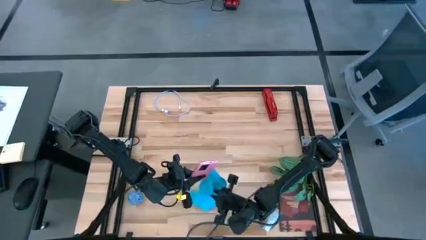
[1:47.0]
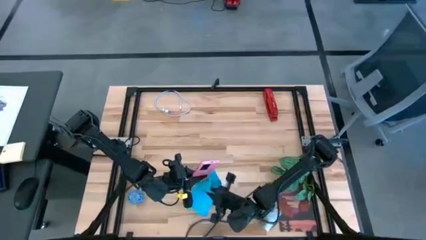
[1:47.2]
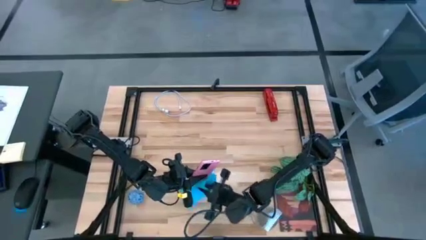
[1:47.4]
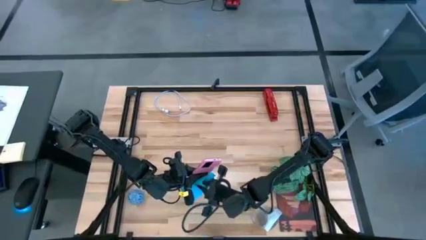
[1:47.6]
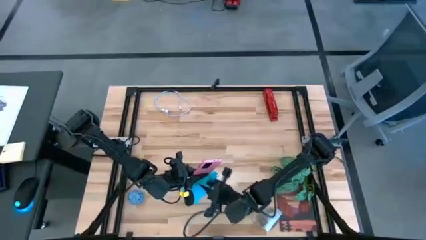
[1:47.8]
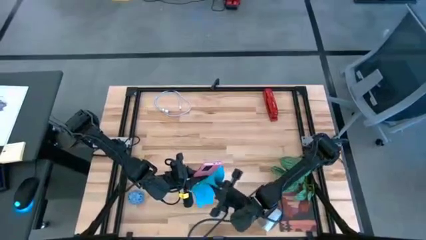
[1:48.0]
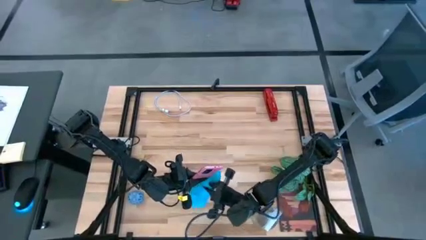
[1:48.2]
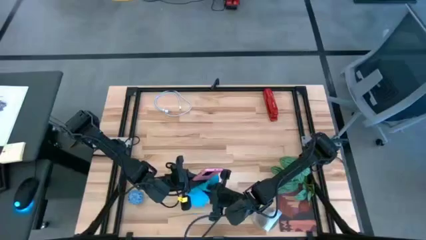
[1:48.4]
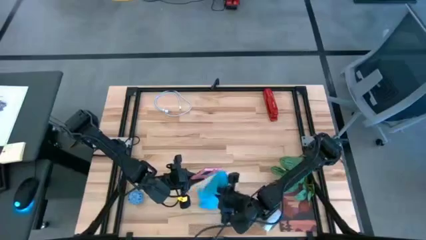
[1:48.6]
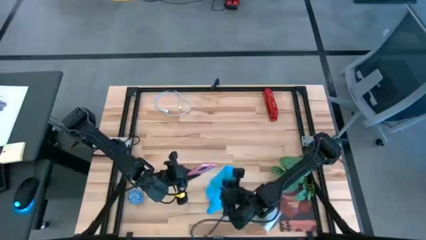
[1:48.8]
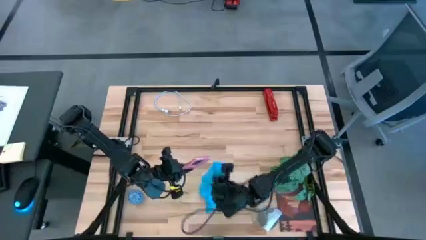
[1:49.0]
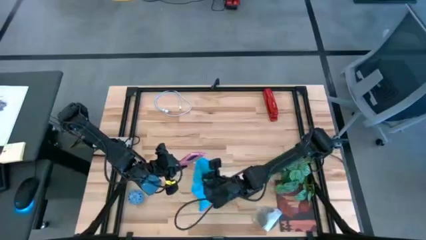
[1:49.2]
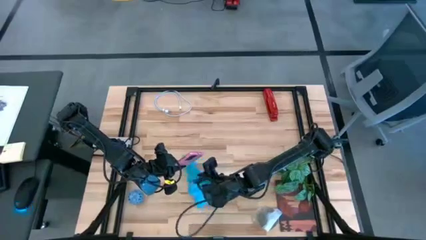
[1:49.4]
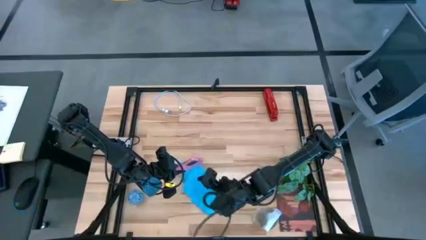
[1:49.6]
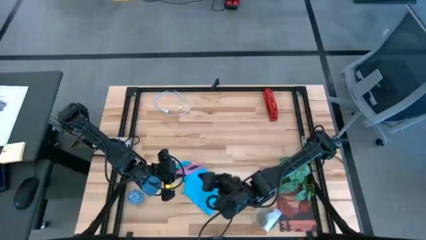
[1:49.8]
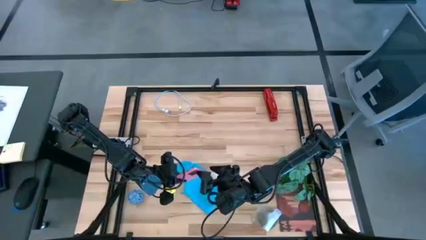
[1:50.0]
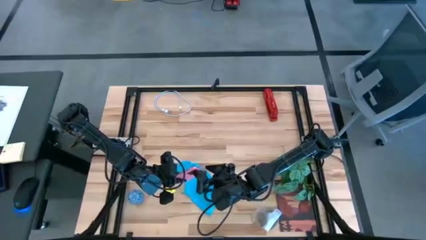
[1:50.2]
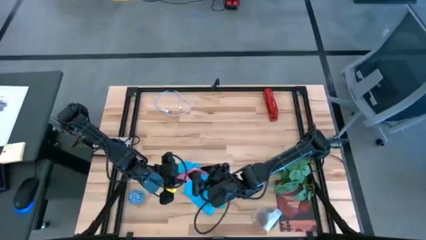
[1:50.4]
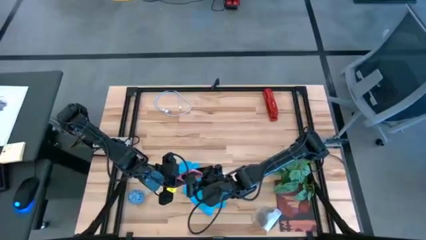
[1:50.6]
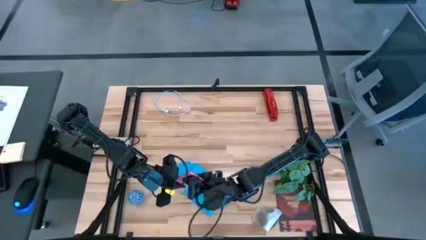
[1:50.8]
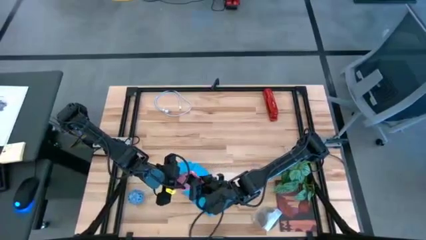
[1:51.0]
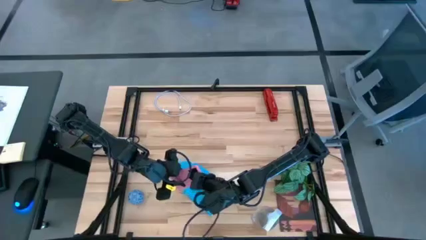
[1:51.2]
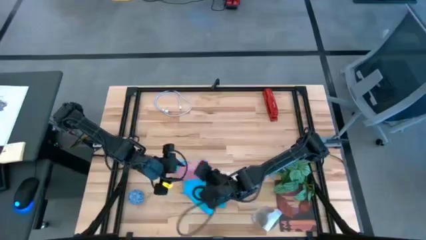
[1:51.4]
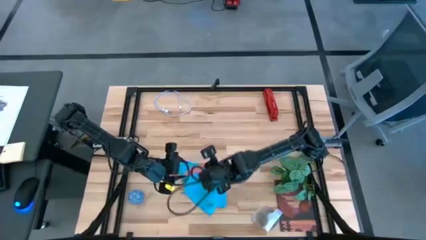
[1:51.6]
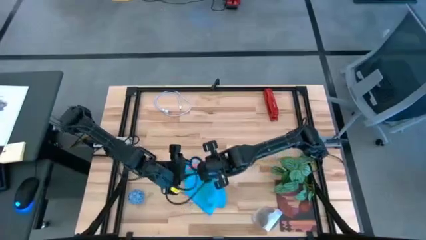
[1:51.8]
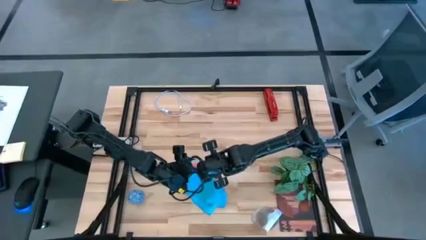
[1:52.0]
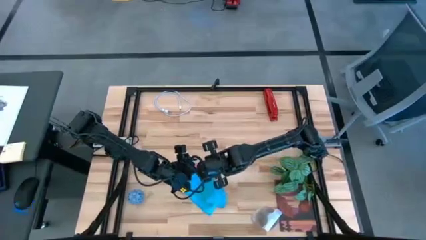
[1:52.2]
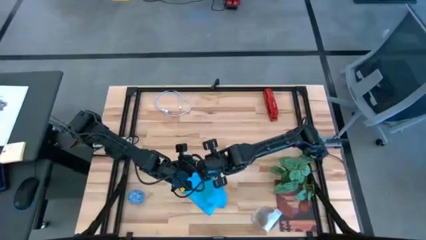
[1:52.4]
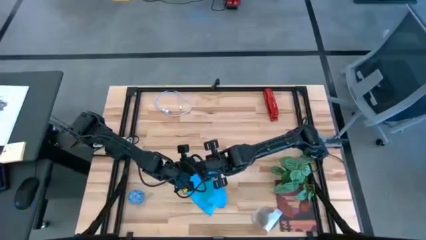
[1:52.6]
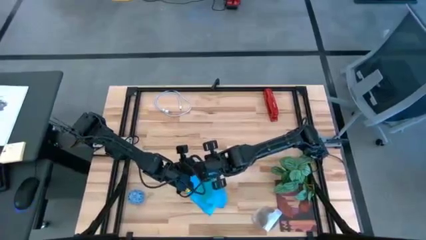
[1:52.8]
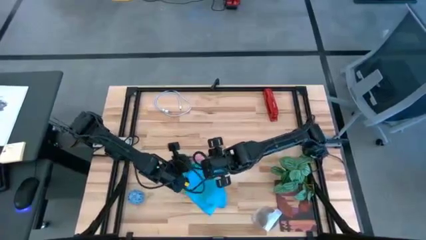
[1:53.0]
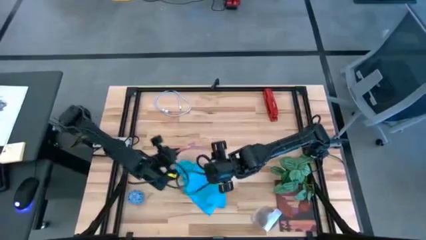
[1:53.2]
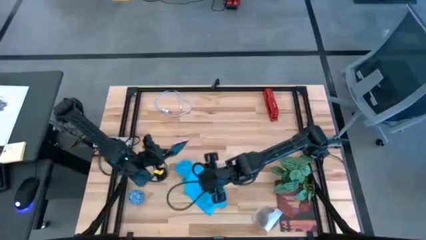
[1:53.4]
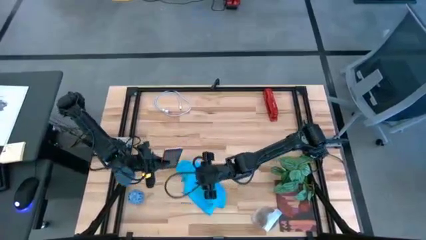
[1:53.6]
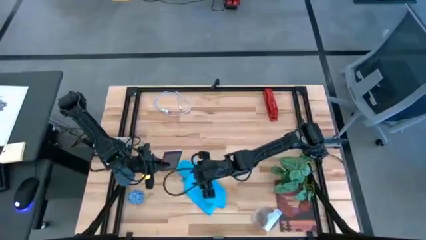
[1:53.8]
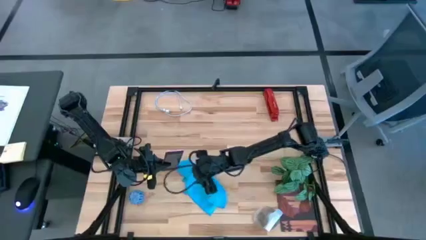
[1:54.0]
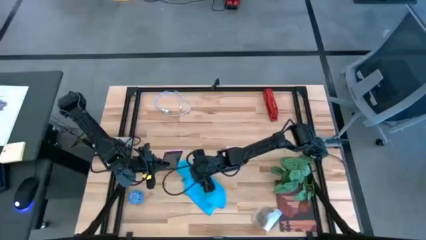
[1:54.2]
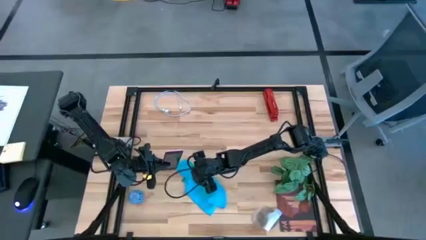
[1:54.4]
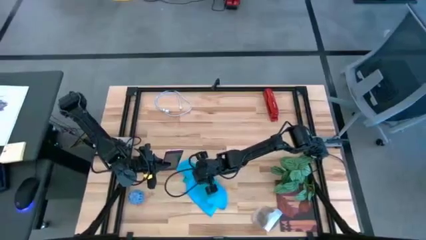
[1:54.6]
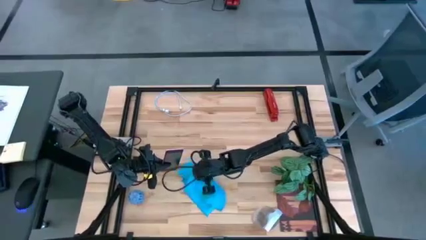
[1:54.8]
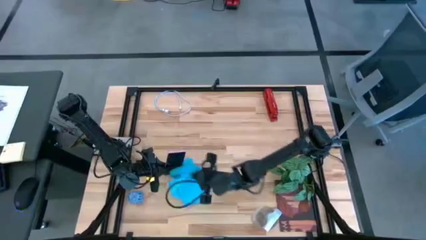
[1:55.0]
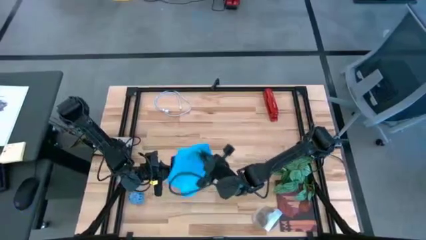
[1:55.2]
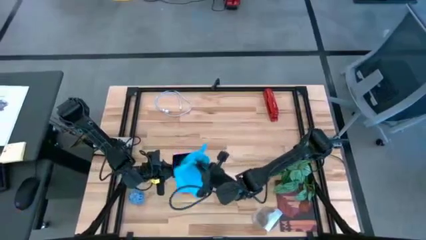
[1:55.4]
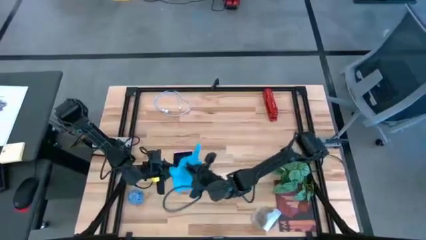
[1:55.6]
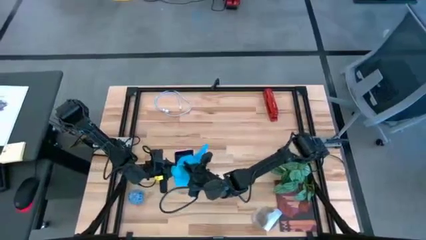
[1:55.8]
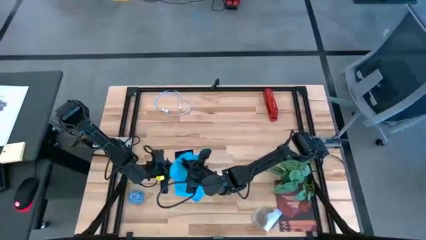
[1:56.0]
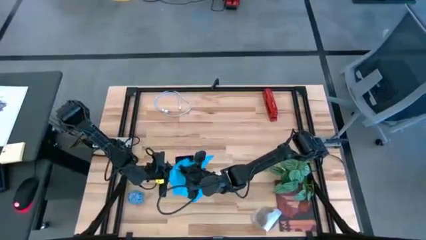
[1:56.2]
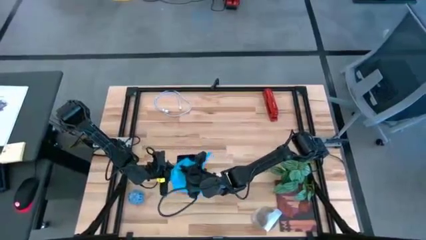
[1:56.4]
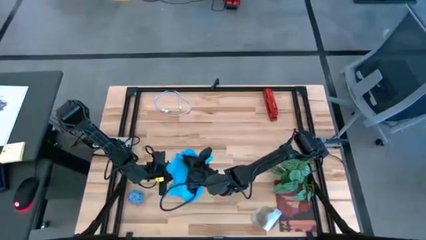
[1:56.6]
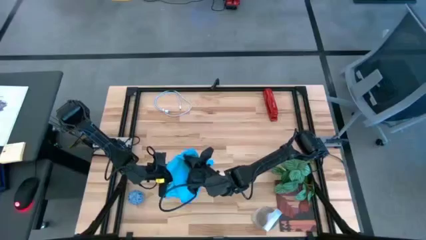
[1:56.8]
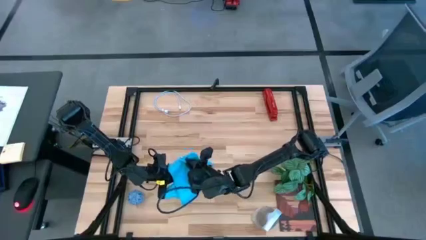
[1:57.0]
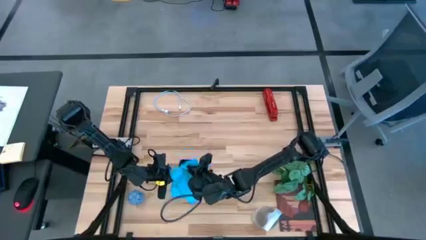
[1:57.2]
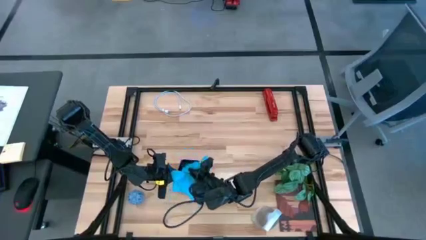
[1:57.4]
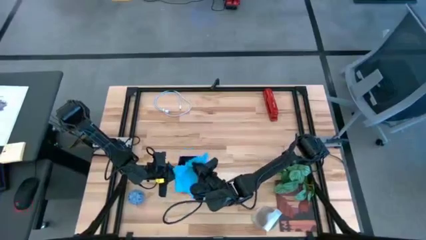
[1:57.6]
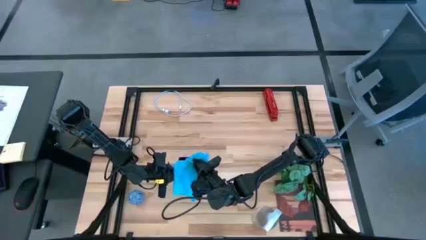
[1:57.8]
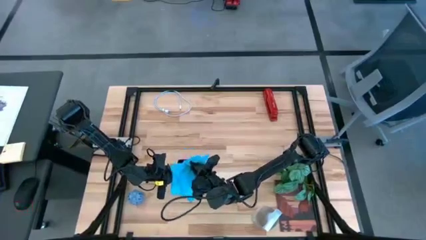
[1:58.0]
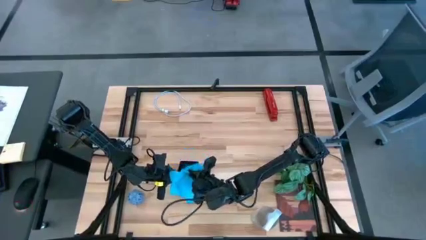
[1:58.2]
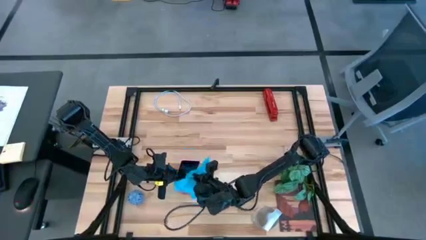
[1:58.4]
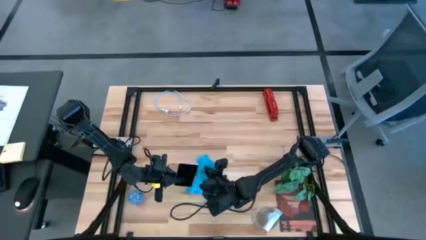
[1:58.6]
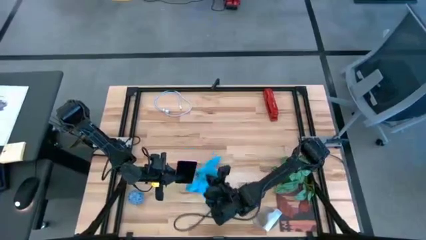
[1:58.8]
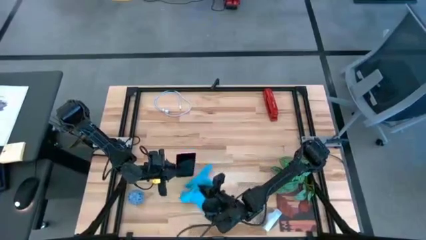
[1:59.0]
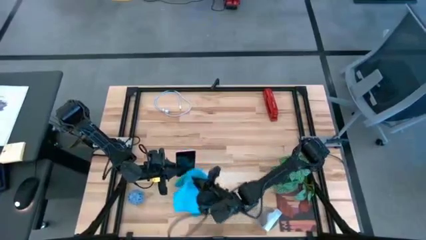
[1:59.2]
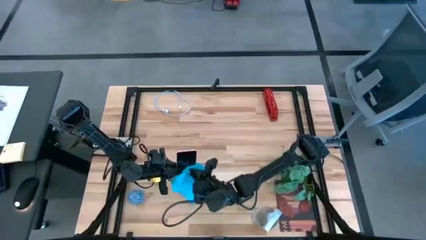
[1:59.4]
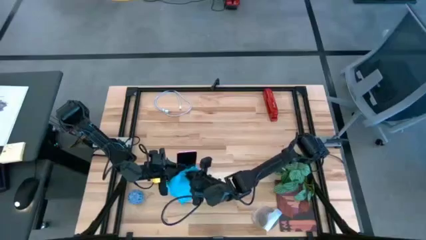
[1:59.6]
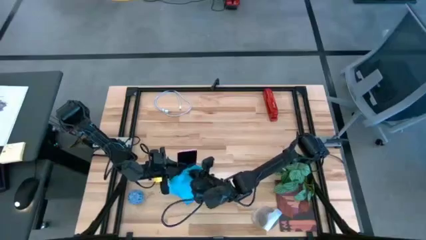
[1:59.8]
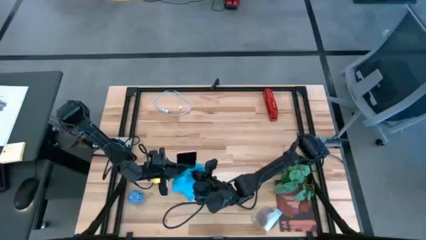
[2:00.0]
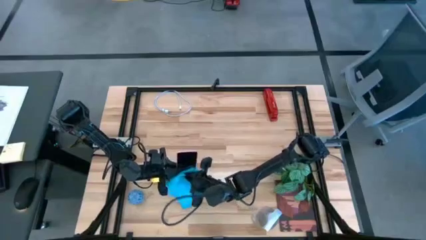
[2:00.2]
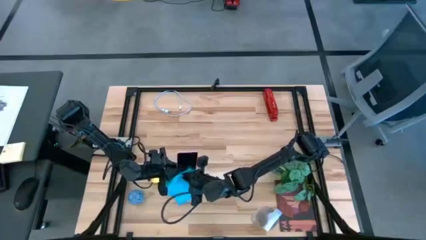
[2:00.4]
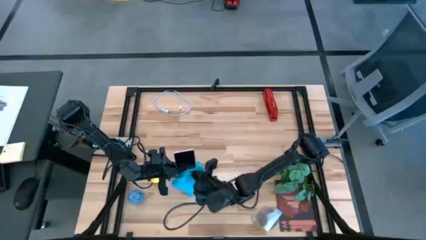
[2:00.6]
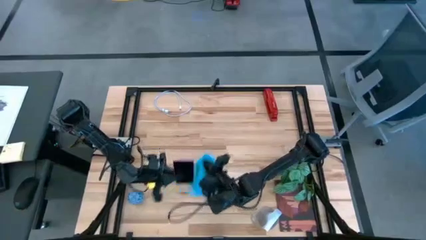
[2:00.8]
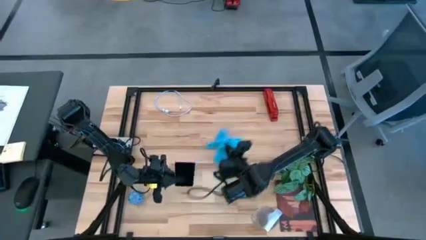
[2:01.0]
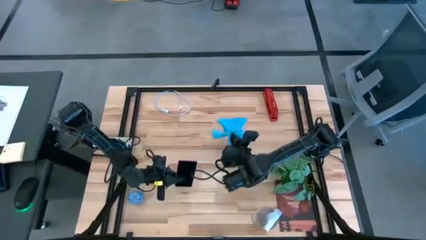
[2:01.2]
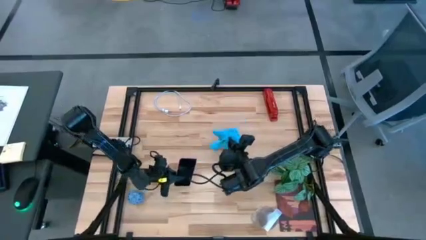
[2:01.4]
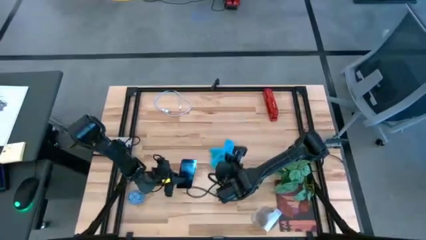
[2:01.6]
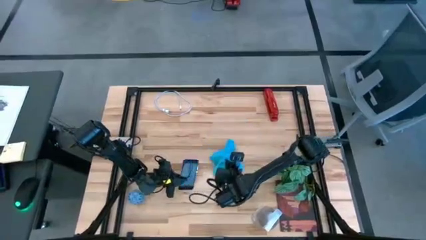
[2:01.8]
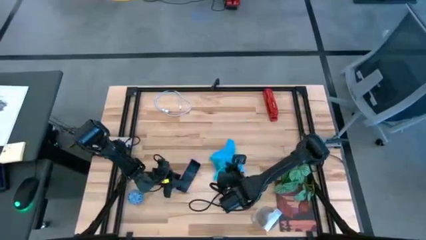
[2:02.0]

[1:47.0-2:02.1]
Task: Apply microfiber cloth
Wipe the back and front of the cellphone with the blue microfiber cloth
